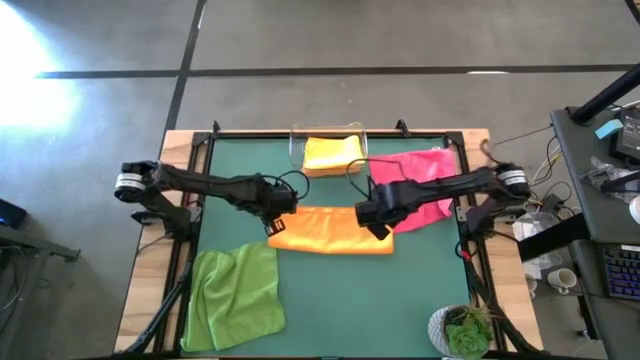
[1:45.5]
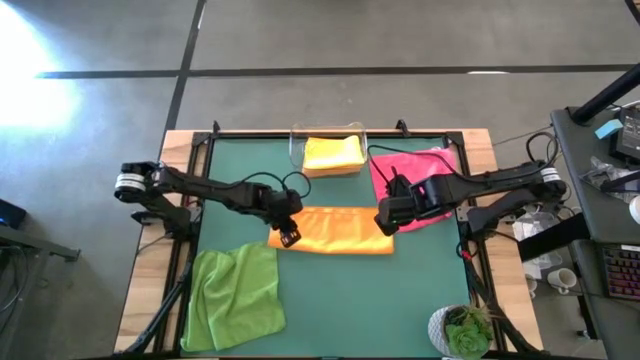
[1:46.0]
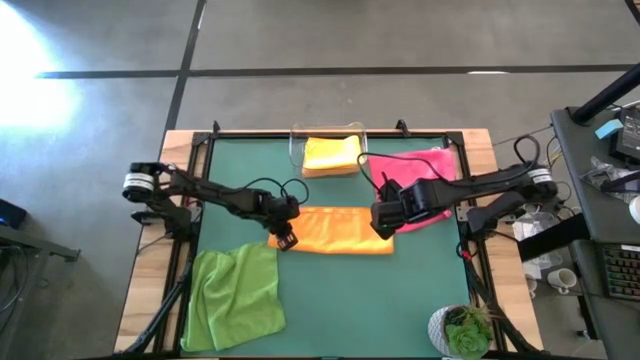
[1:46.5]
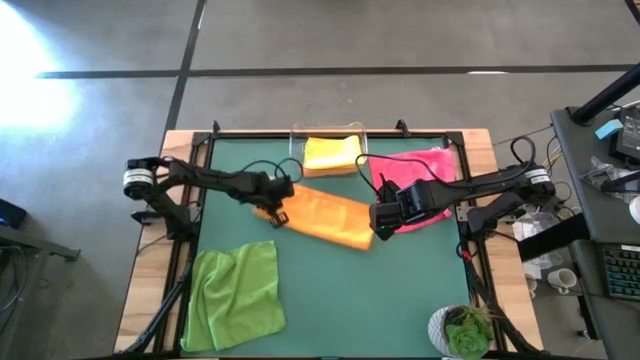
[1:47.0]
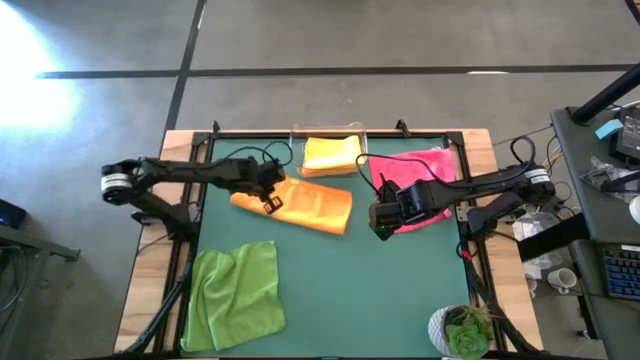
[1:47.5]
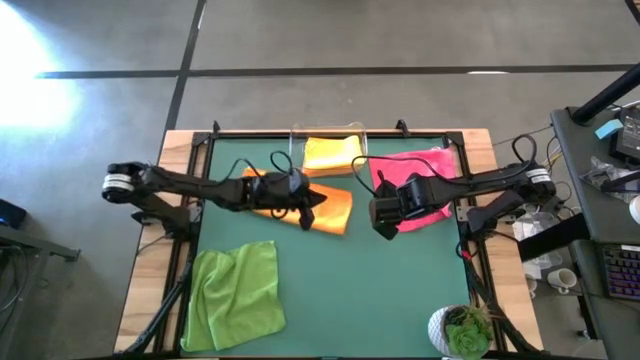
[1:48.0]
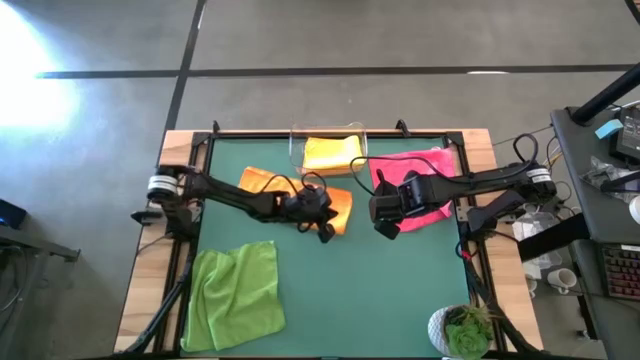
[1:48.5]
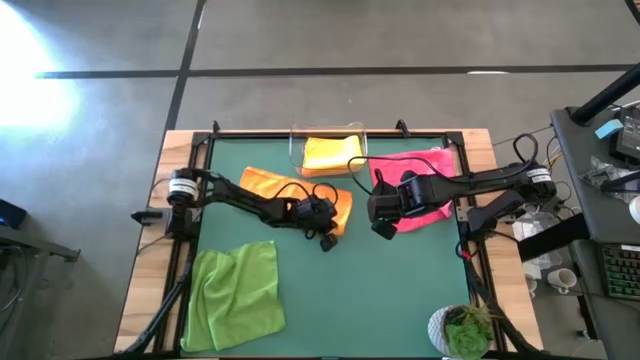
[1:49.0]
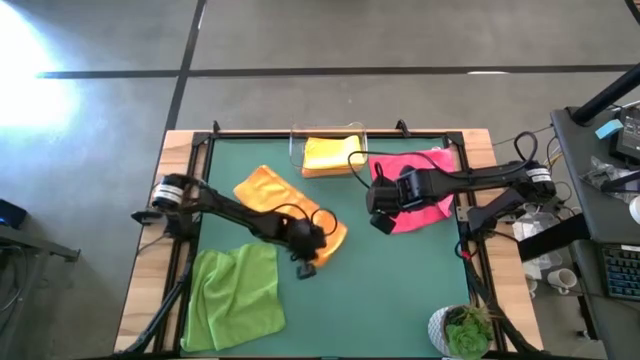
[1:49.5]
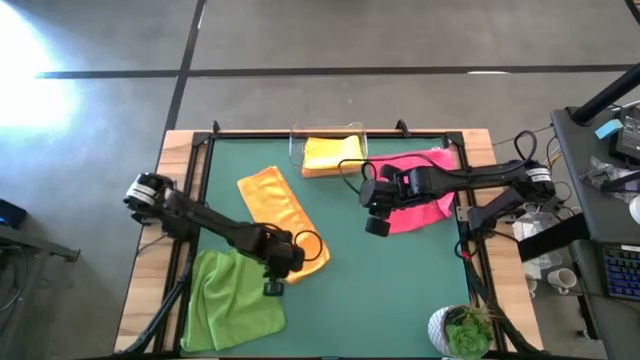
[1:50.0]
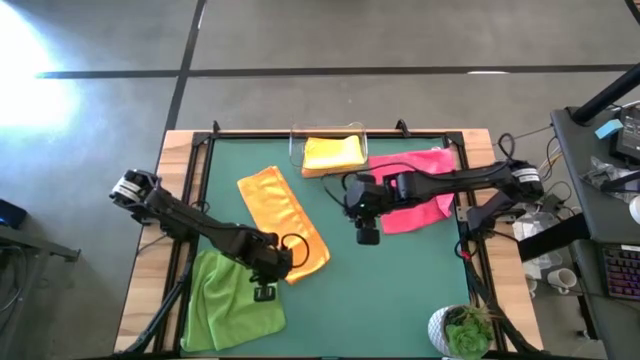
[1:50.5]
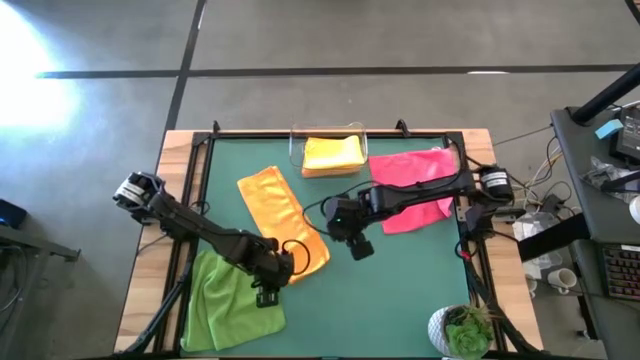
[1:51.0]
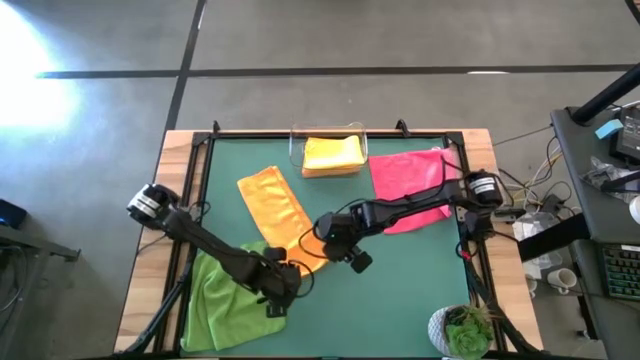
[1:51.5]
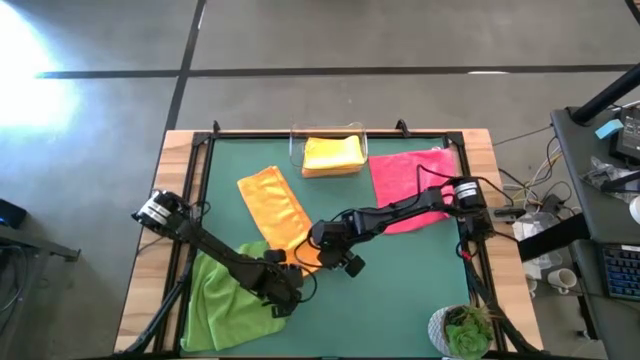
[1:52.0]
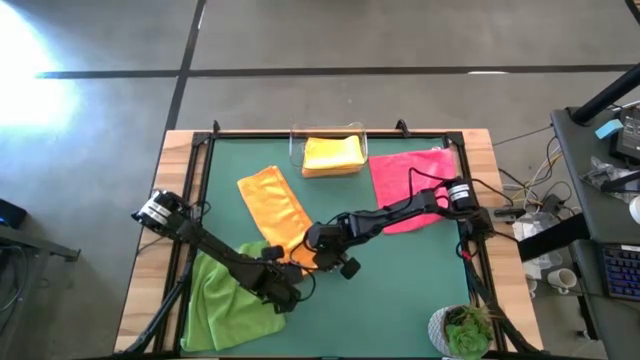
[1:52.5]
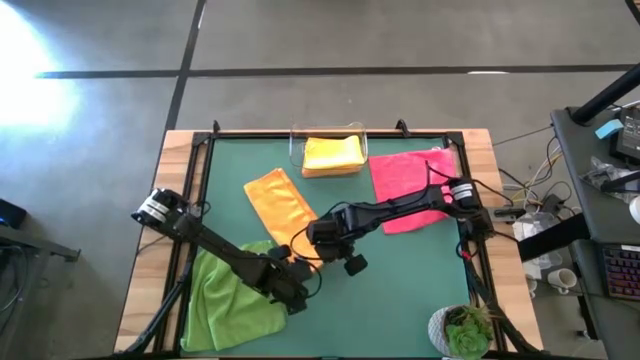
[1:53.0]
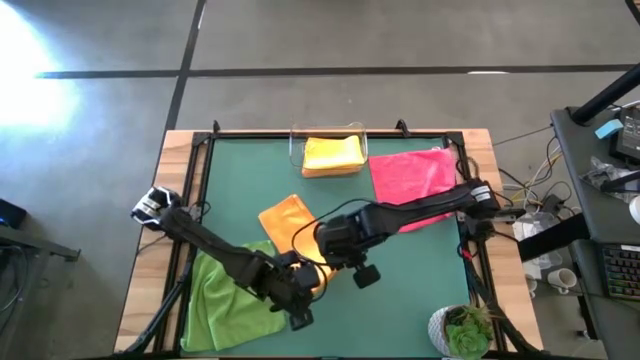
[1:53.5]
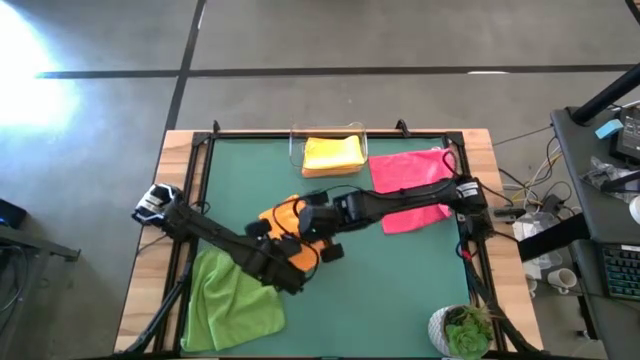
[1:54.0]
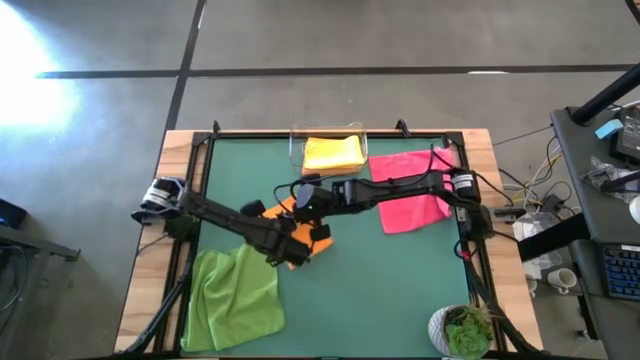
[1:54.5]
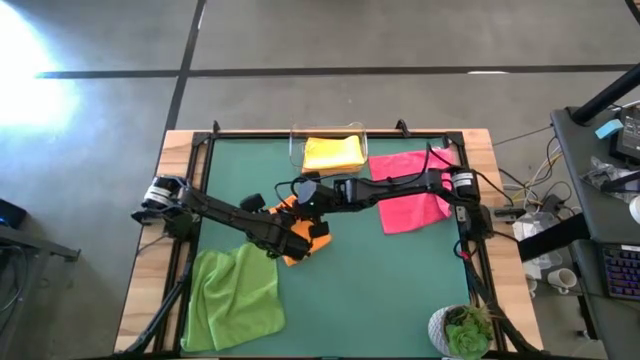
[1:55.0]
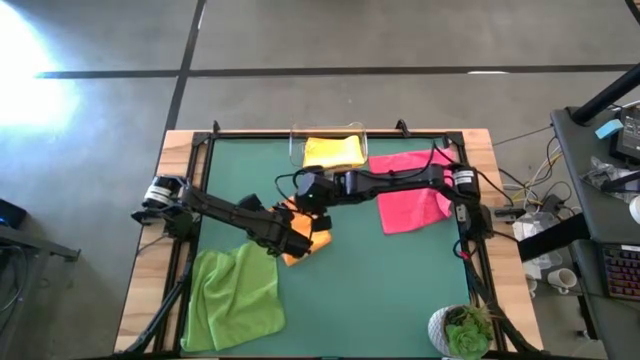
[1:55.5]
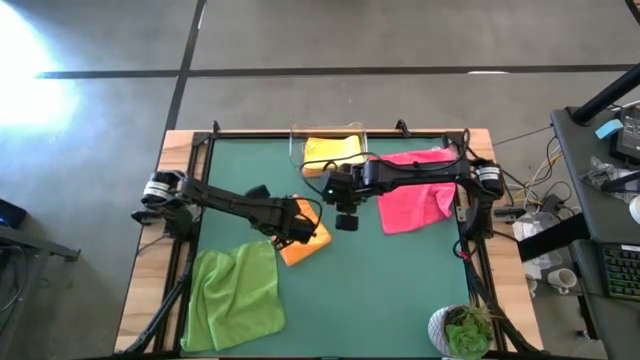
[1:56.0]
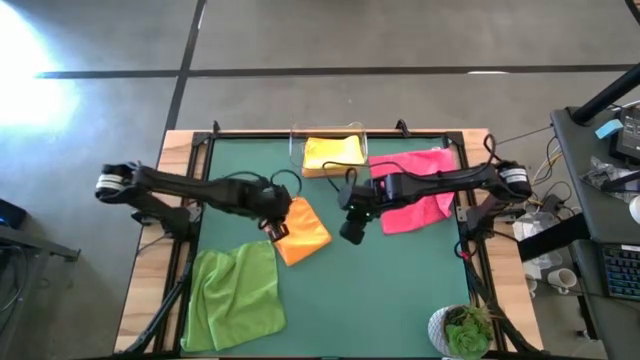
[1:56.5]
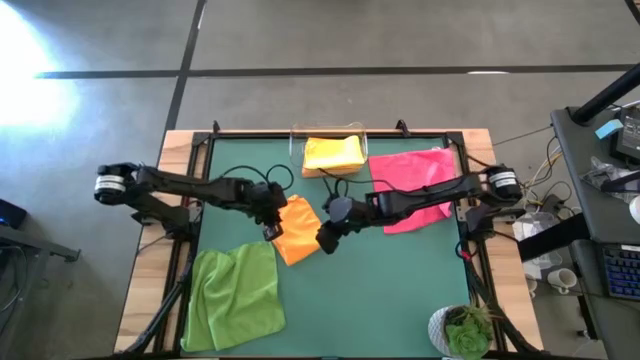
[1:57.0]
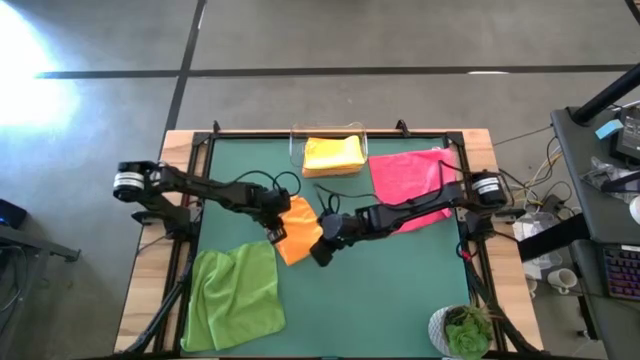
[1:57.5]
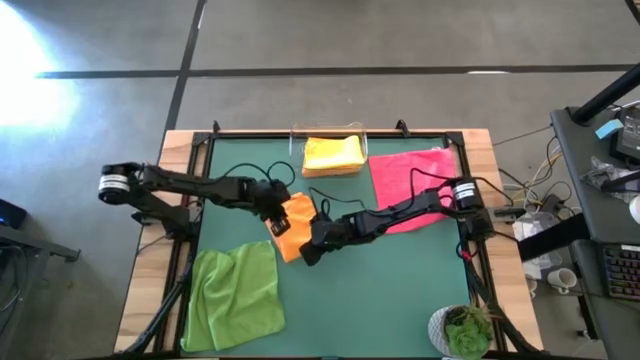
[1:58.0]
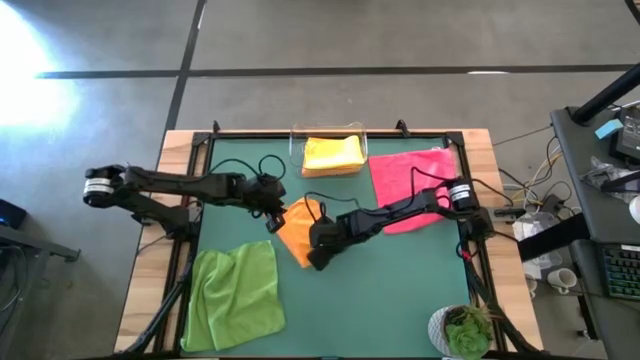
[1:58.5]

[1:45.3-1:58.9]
Task: Fold microfiber towels
Fold the orange microfiber cloth

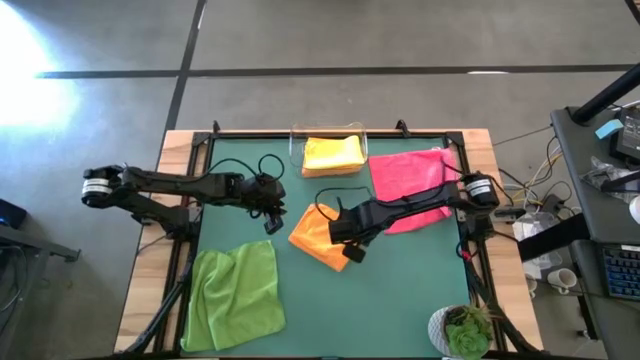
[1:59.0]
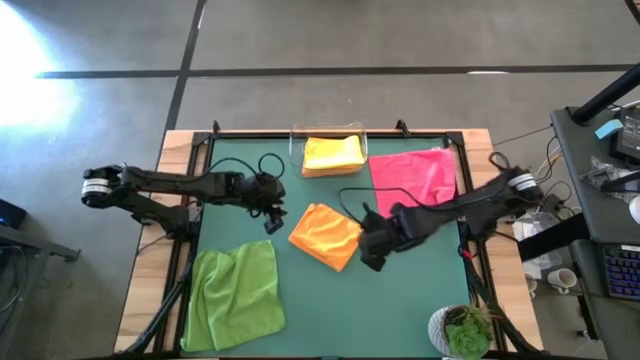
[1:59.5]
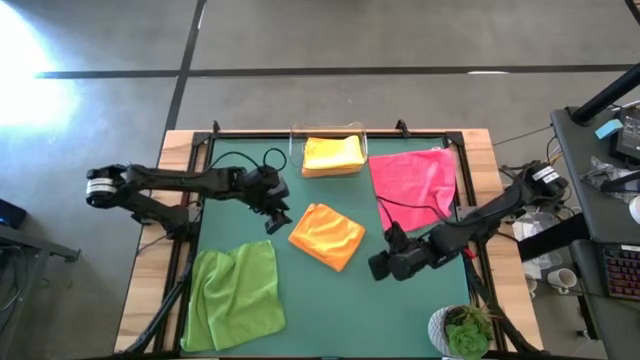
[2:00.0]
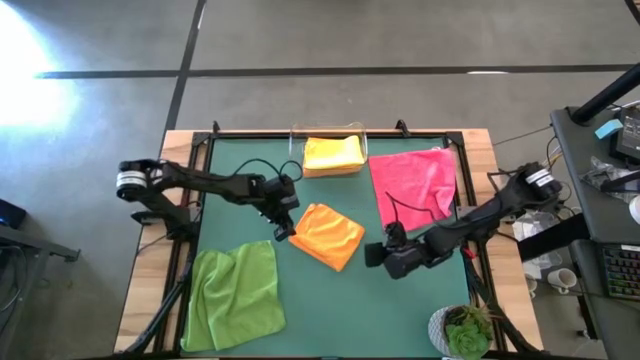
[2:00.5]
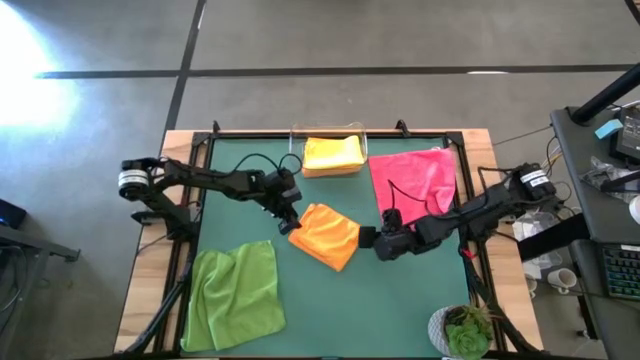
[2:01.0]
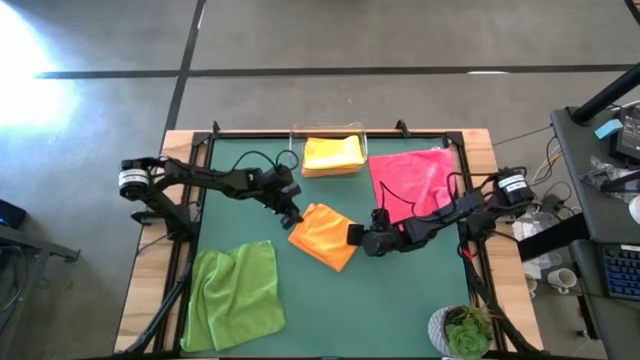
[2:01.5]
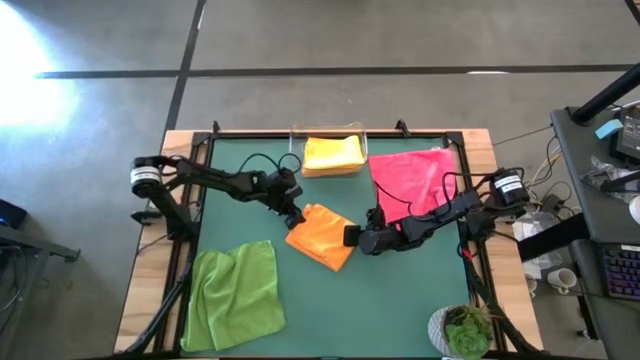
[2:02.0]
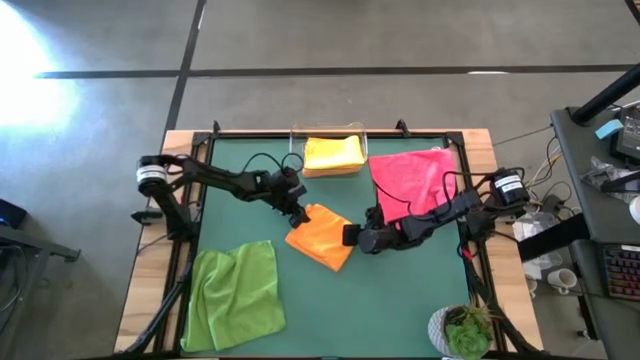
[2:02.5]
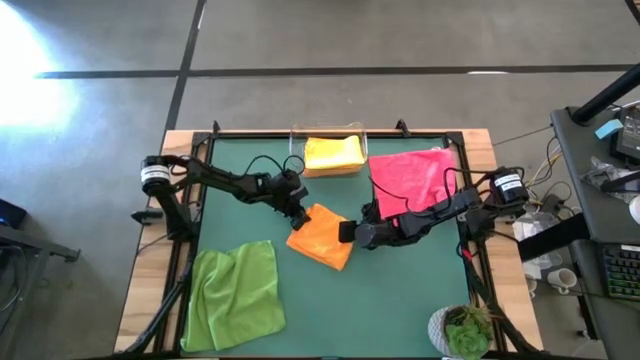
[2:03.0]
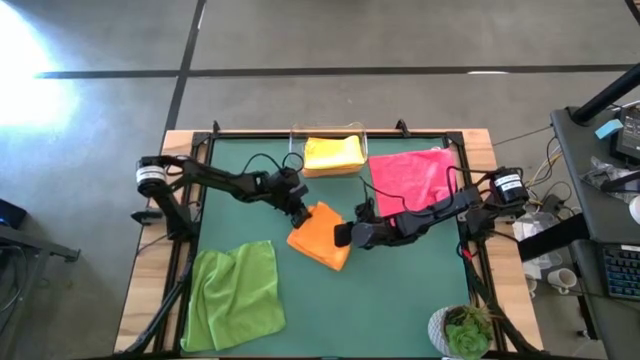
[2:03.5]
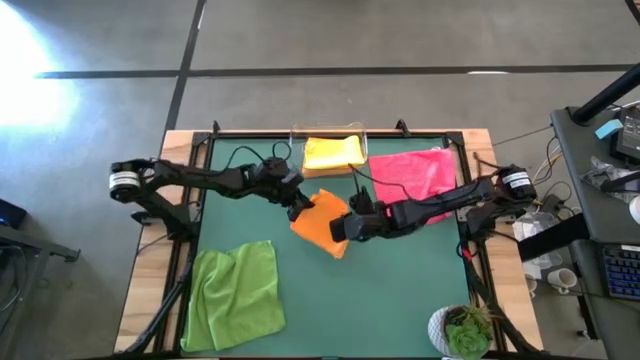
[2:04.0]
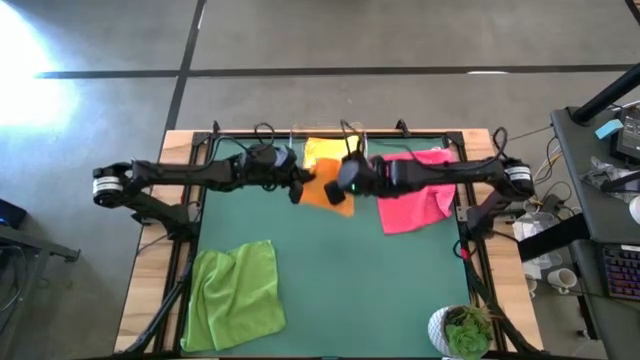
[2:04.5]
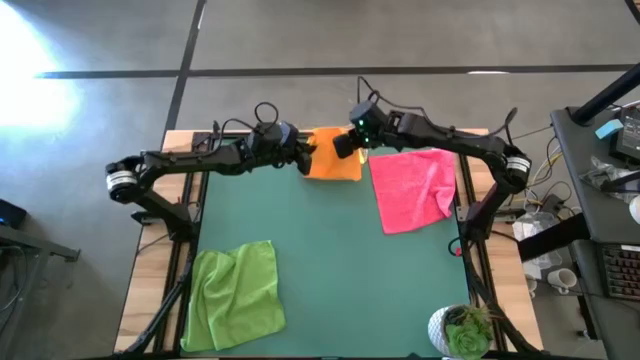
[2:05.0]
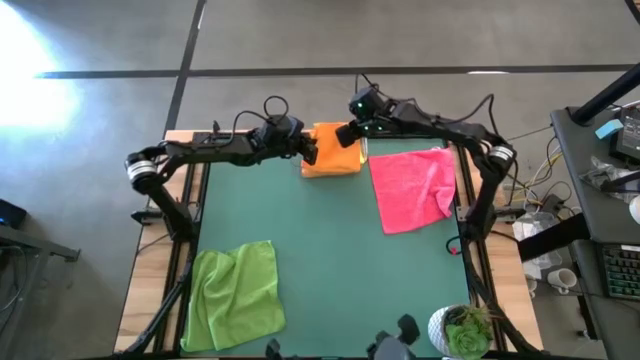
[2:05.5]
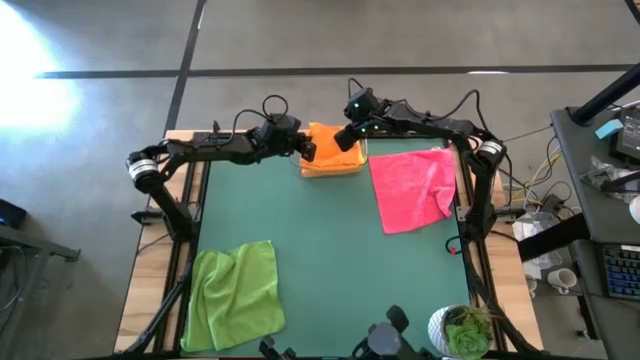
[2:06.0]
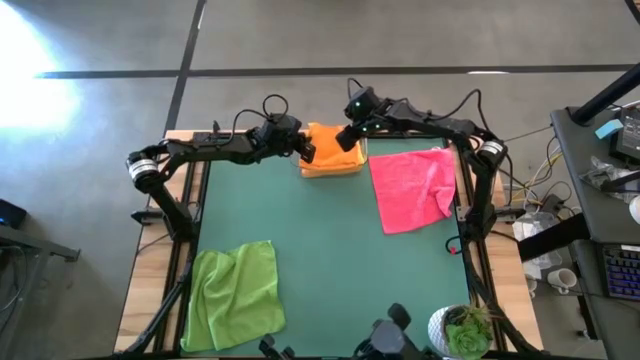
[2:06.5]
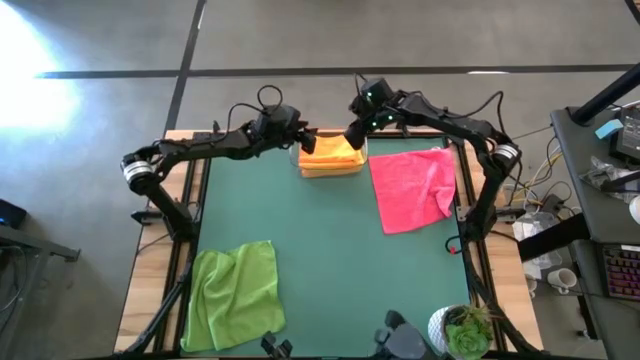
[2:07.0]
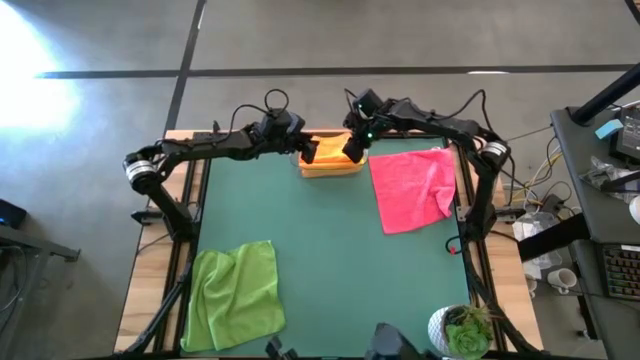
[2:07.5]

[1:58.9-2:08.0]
Stack the orange microfiber towel on top of the yellow microfiber towel
